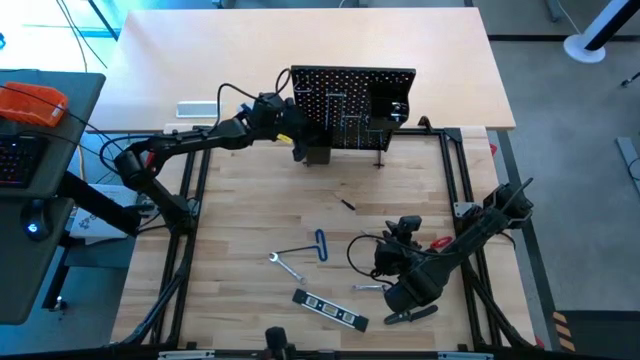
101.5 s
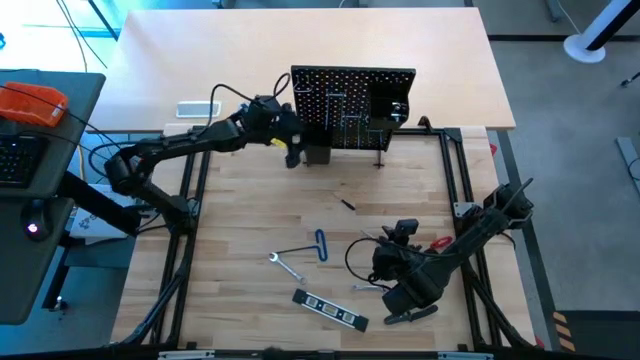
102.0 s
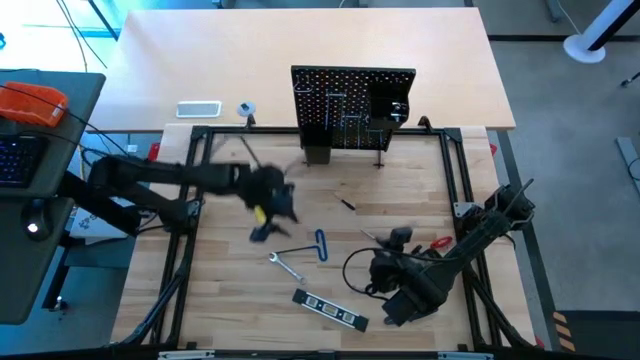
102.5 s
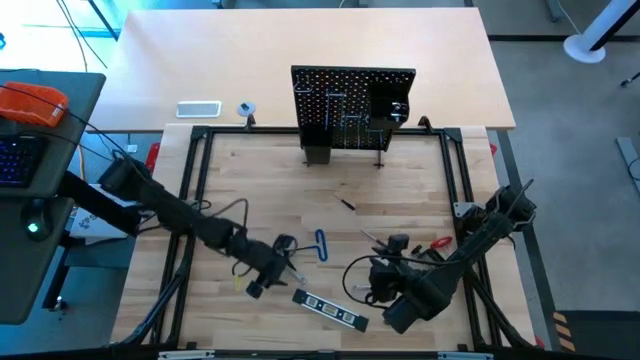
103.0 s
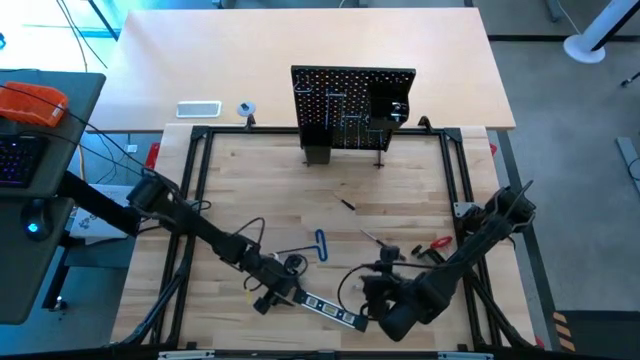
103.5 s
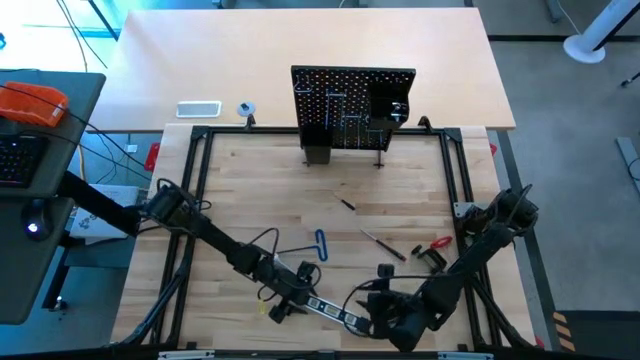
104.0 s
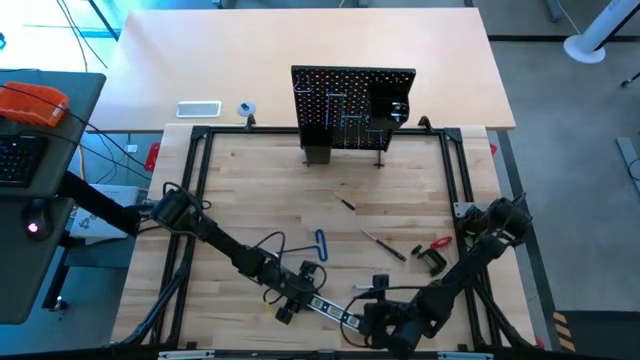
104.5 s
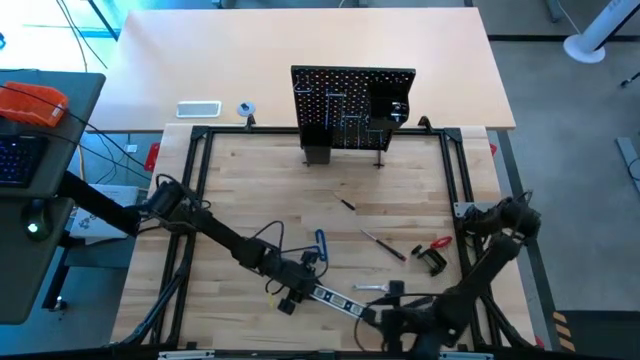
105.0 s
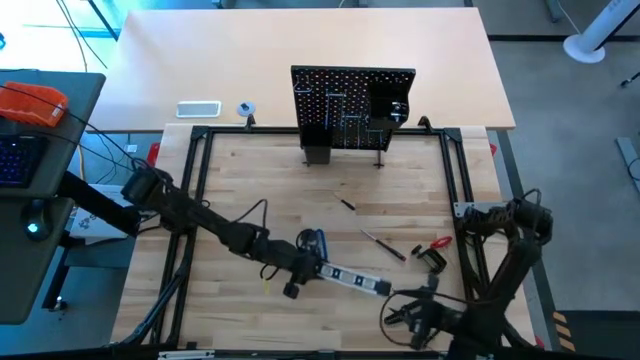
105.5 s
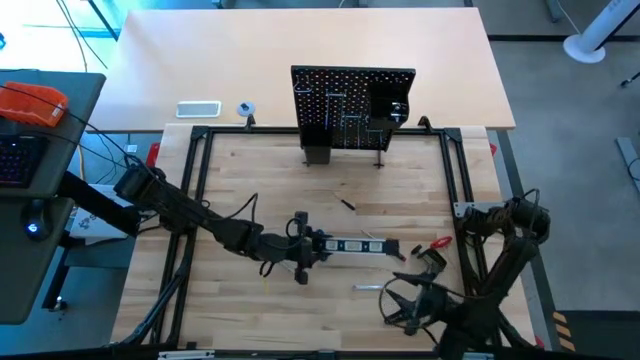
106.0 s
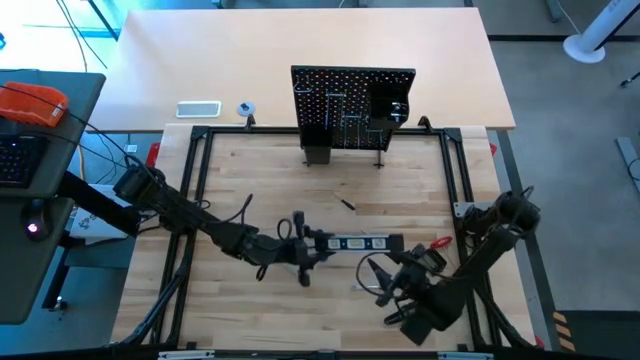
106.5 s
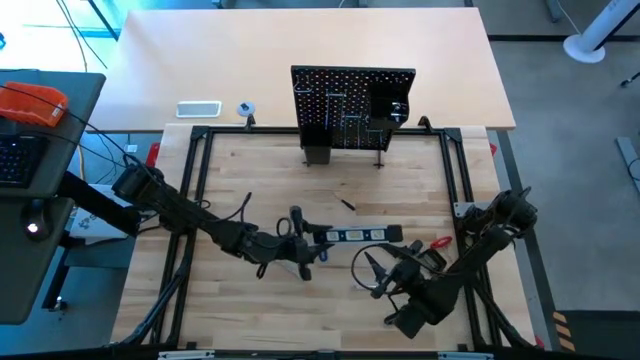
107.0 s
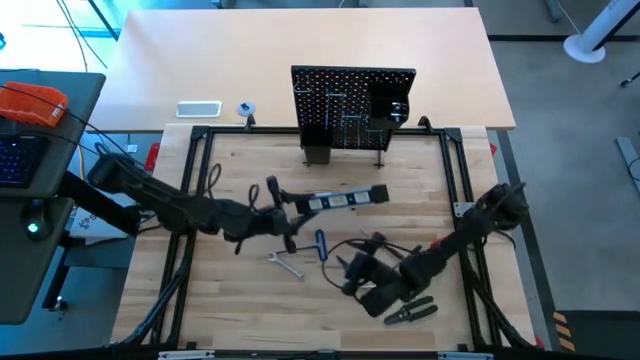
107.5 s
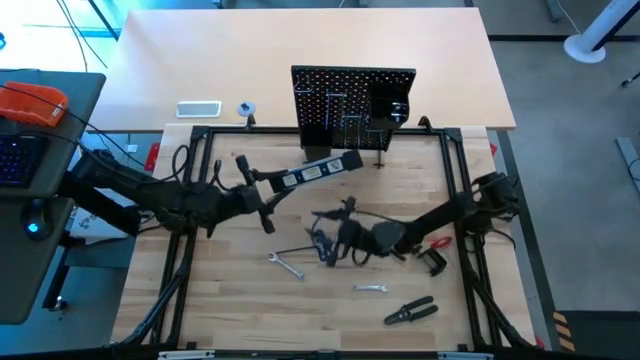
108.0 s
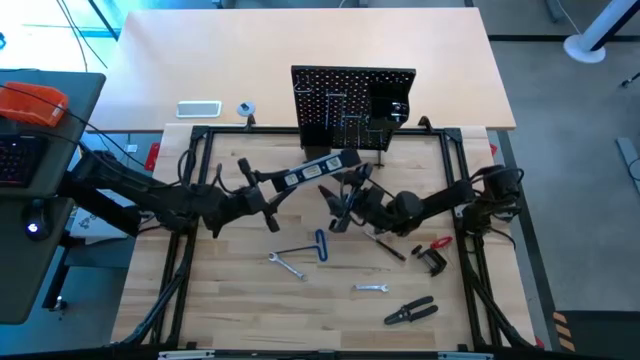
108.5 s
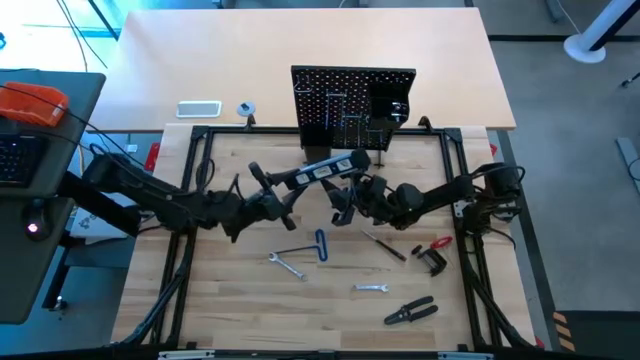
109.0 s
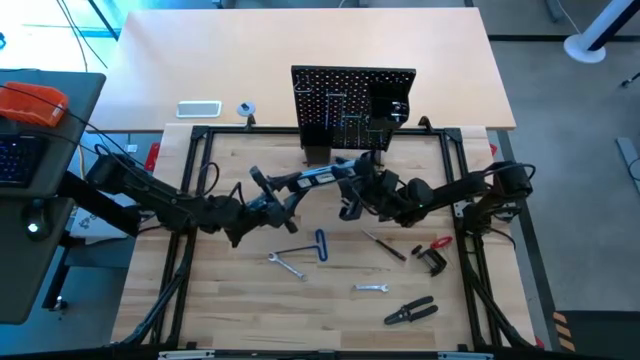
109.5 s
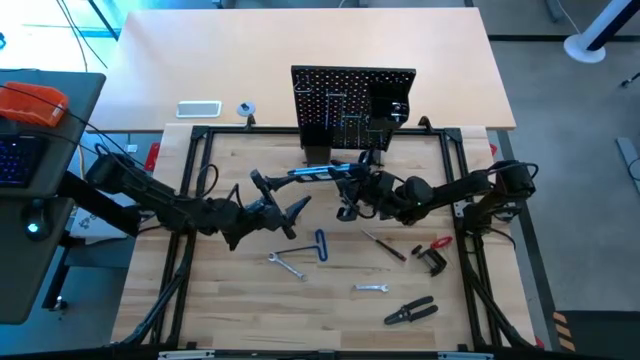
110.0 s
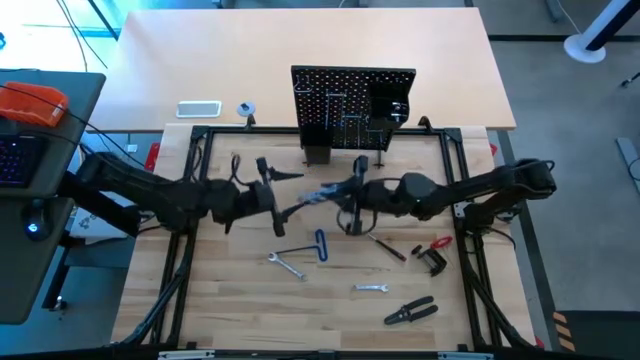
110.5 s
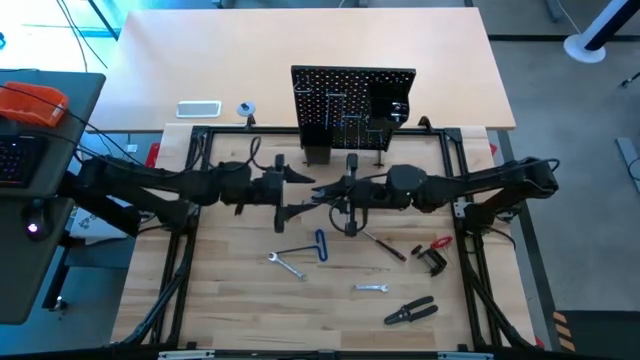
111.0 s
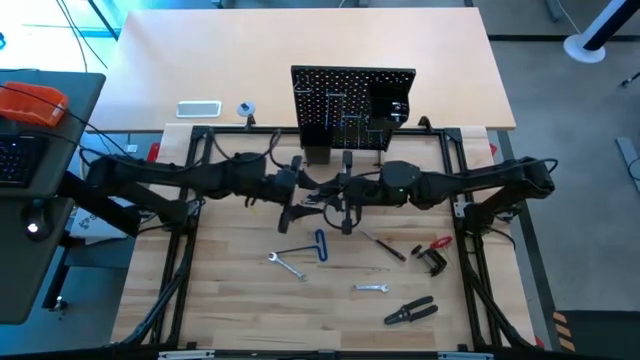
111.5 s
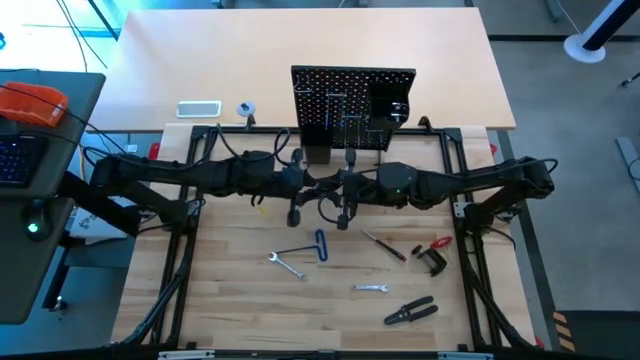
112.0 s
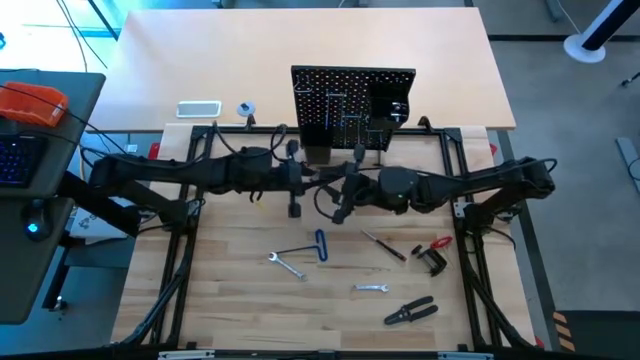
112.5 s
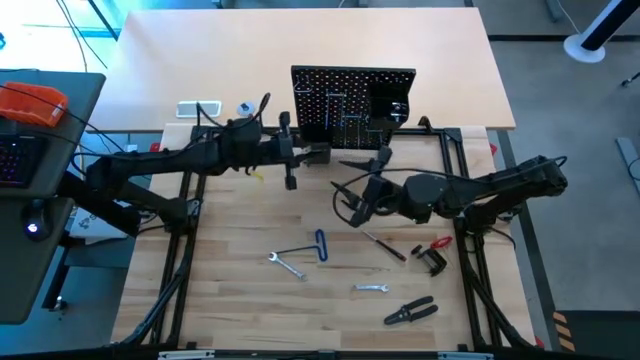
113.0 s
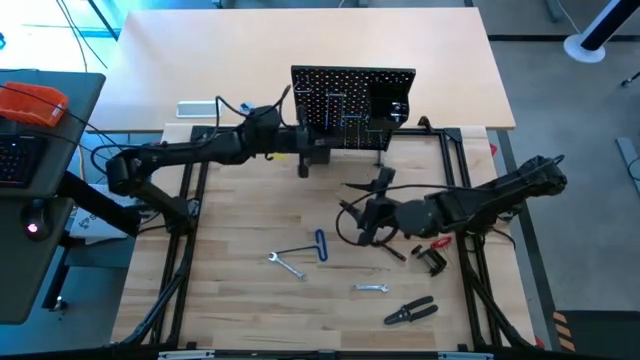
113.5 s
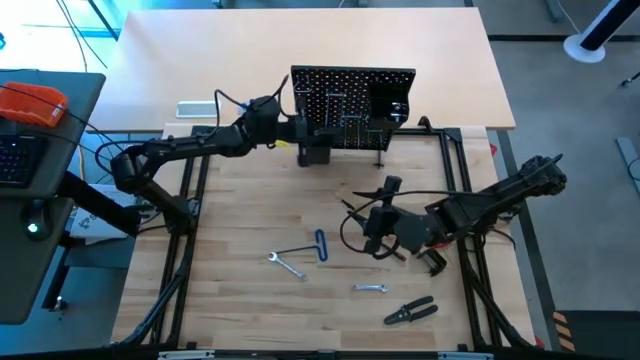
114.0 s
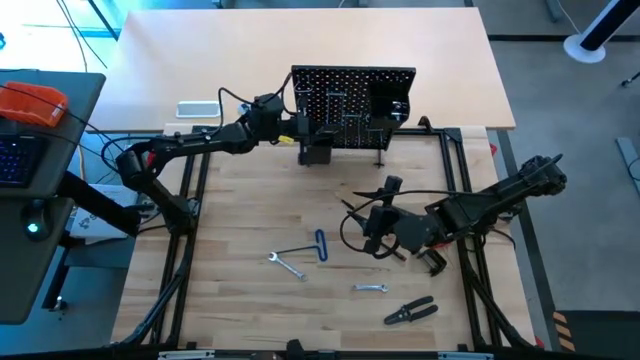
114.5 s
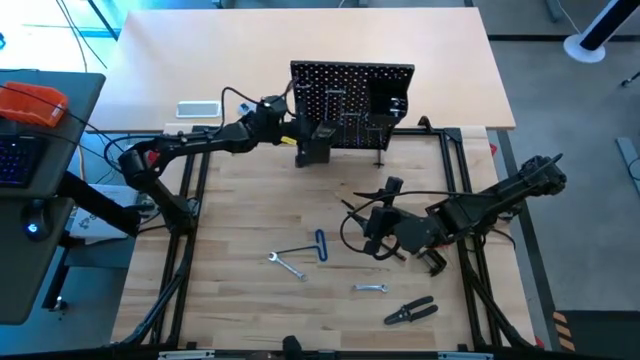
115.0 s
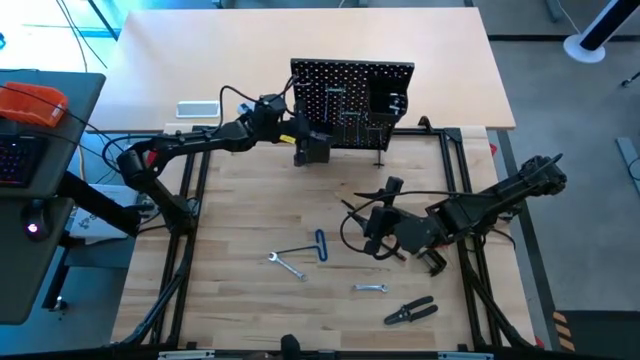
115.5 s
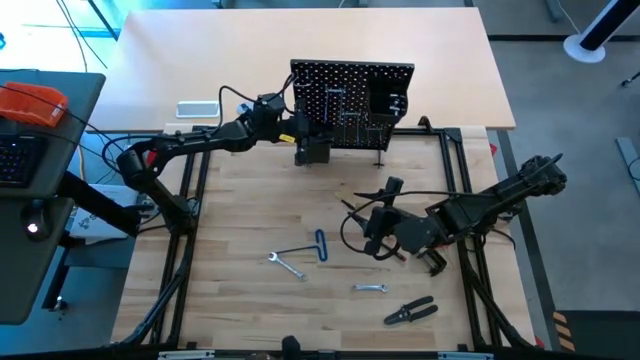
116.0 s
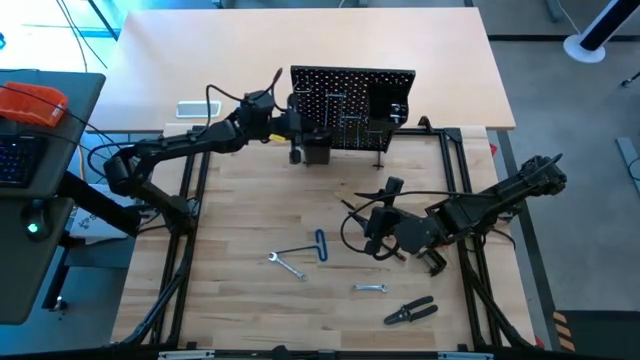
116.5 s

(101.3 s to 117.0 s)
Task: Hang tools onto peg board
Put the spirit level tool on the pegboard

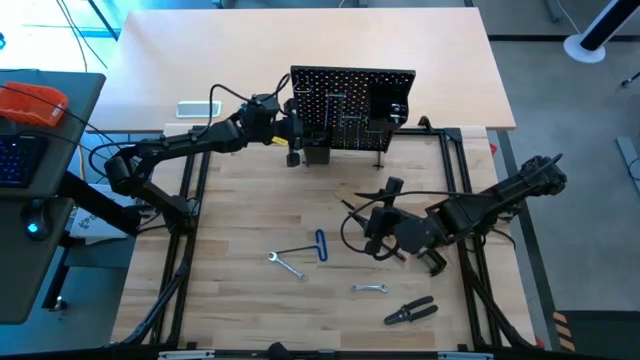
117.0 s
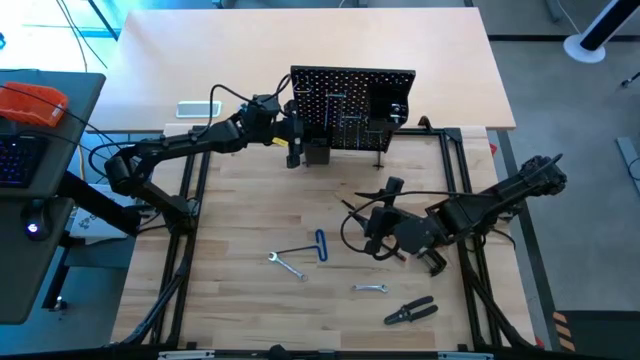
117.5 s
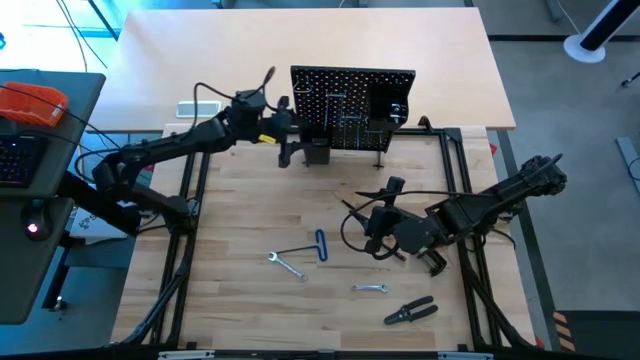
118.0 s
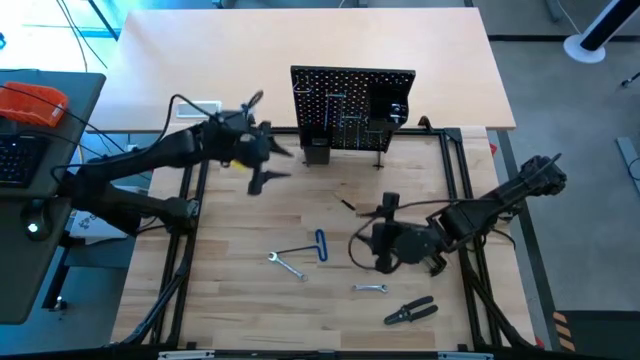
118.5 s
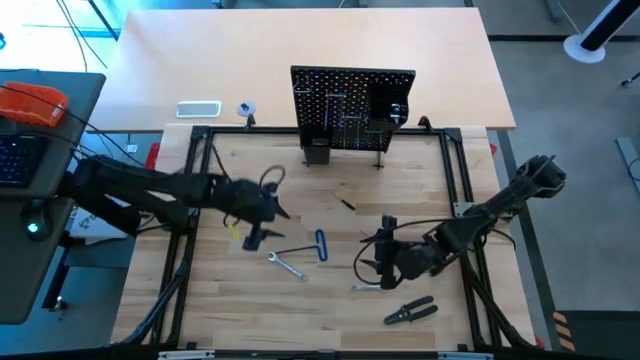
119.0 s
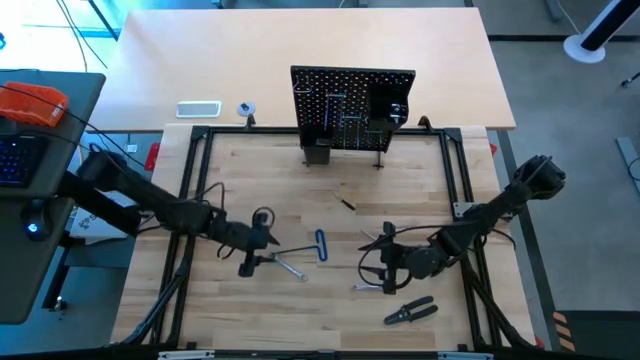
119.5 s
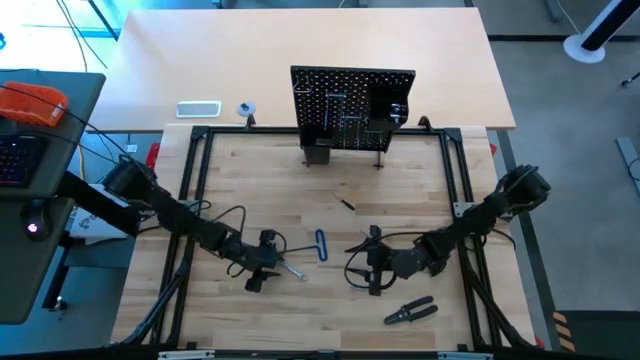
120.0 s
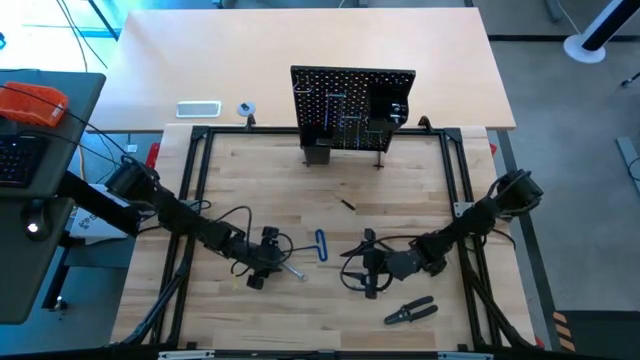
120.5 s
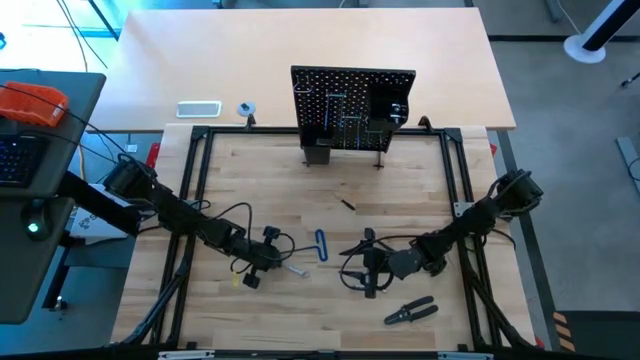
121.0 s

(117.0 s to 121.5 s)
Hang the left wrench on the pegboard

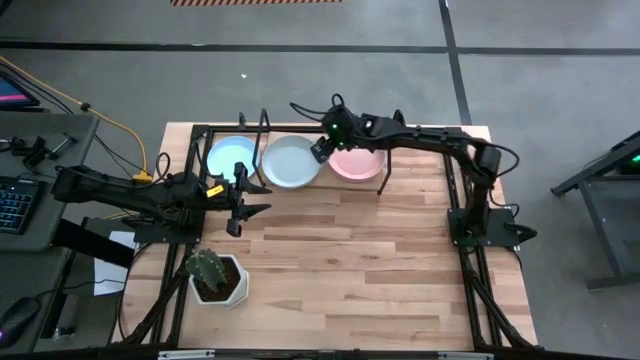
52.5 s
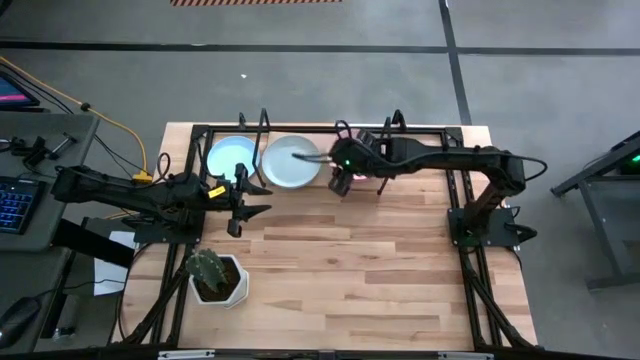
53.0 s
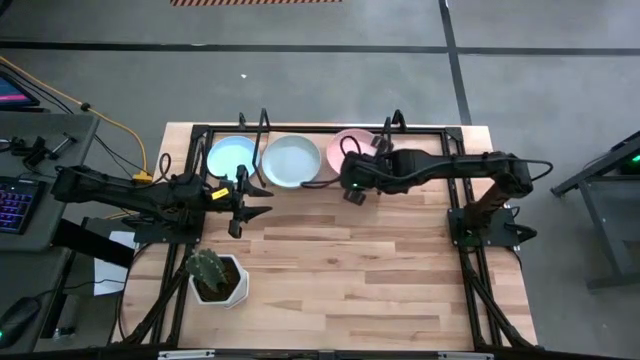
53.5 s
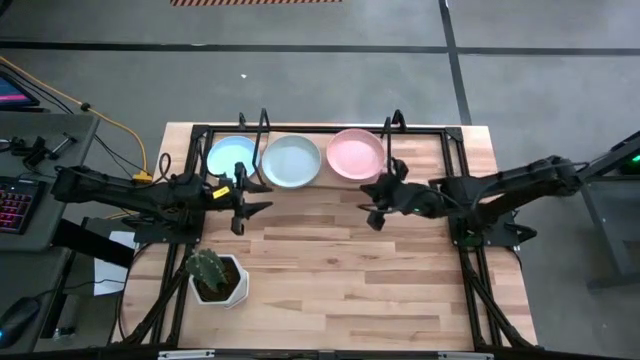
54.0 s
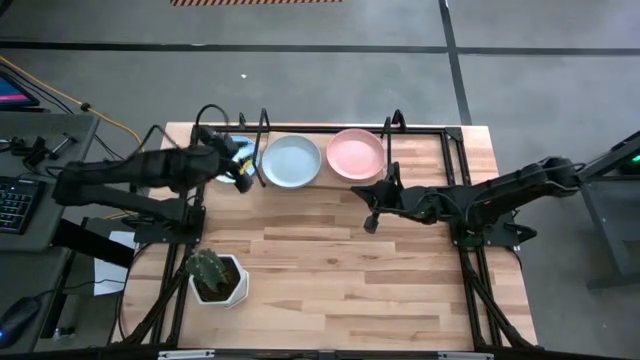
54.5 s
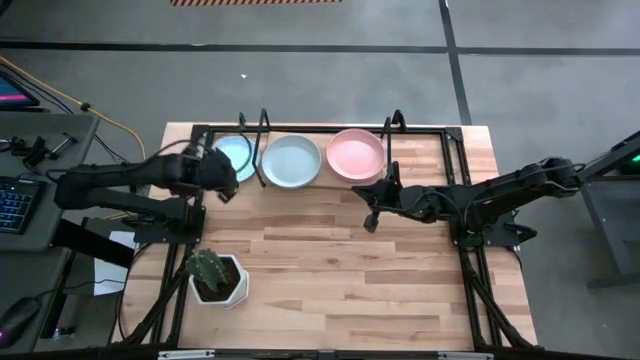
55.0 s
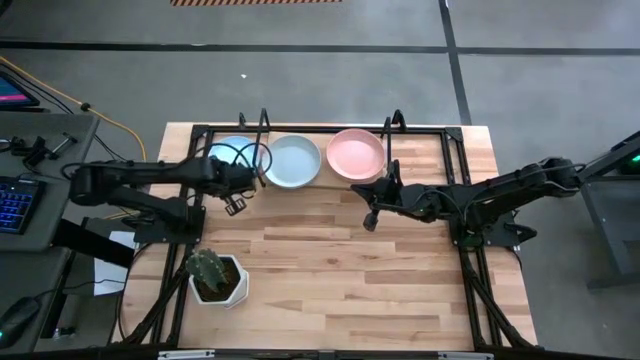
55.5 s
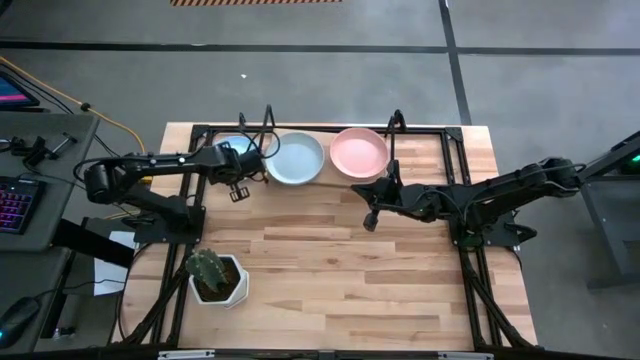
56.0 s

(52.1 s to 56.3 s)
Task: Place and stack plates onto a shelf
Adjust the shelf
